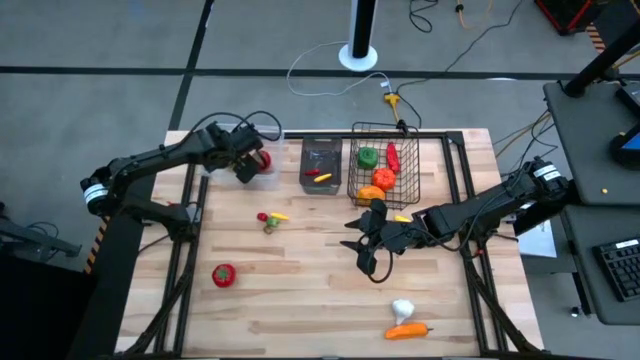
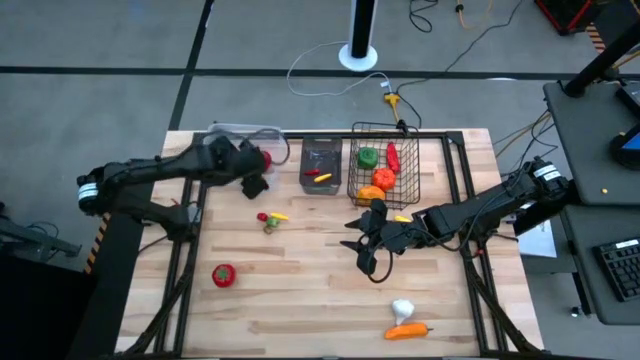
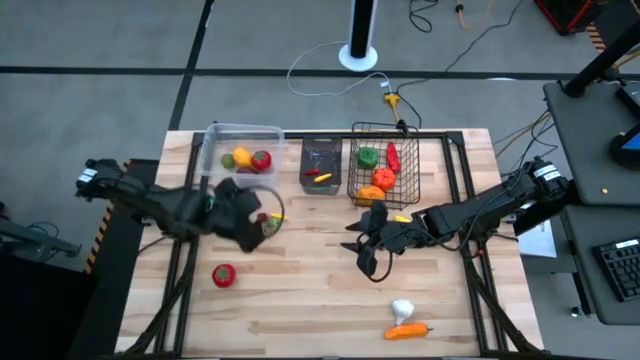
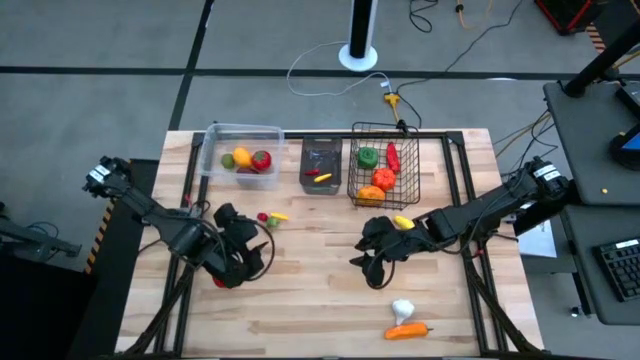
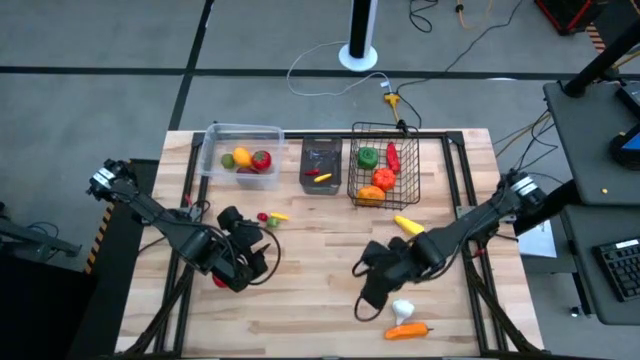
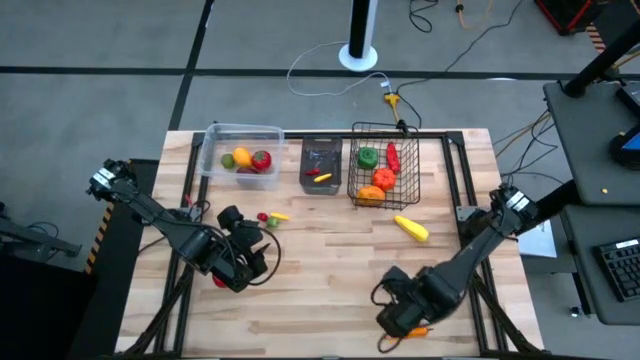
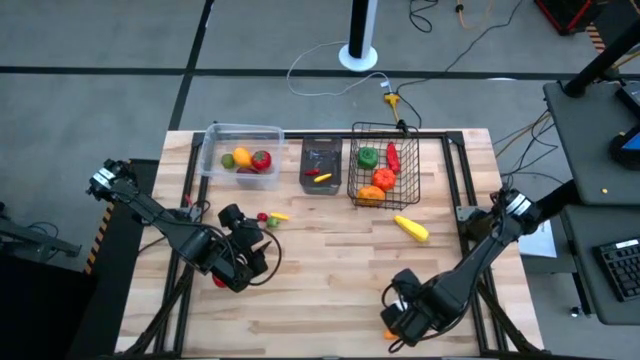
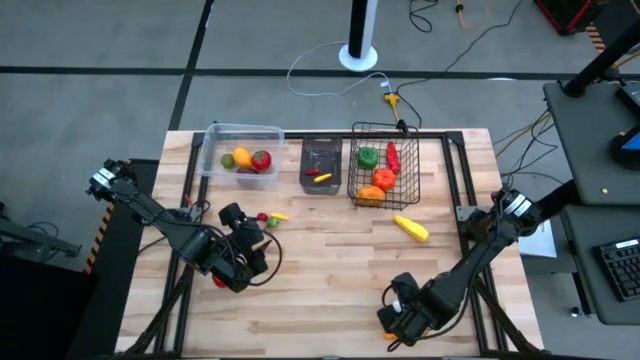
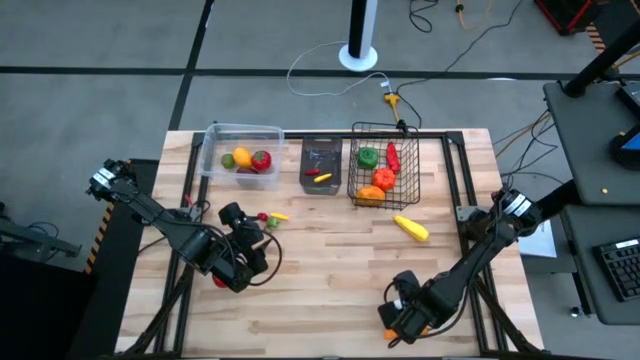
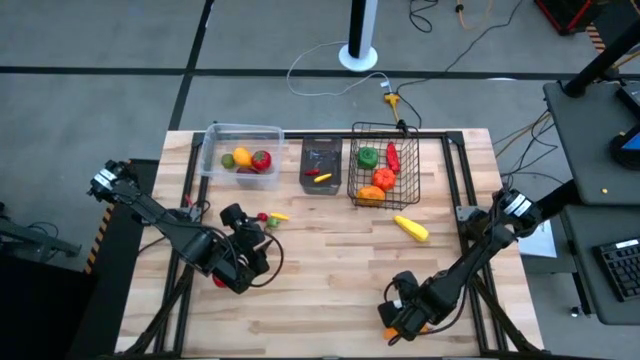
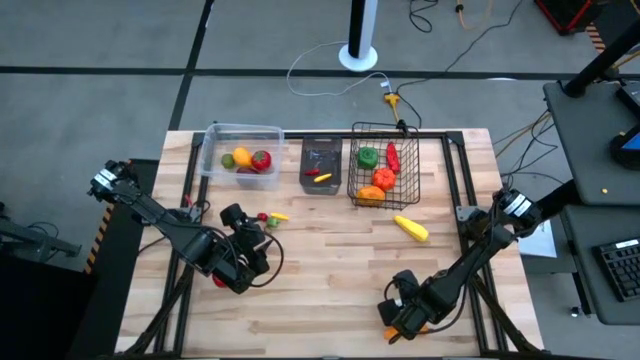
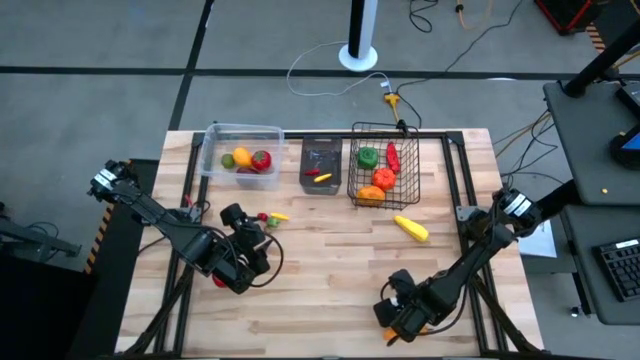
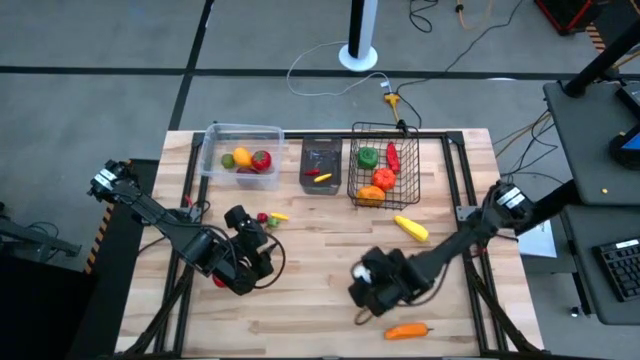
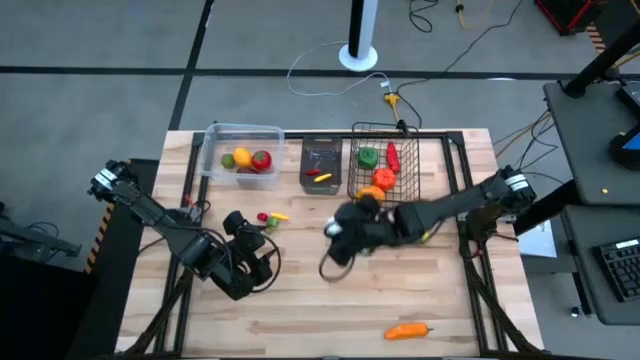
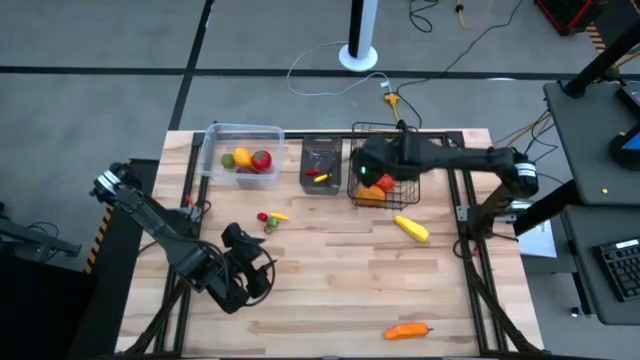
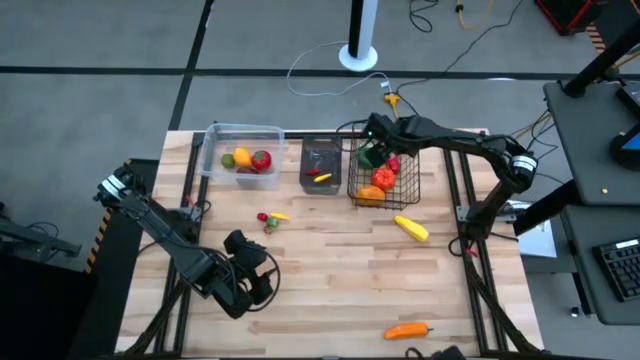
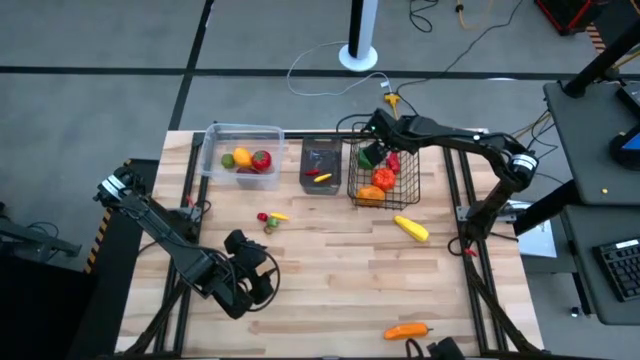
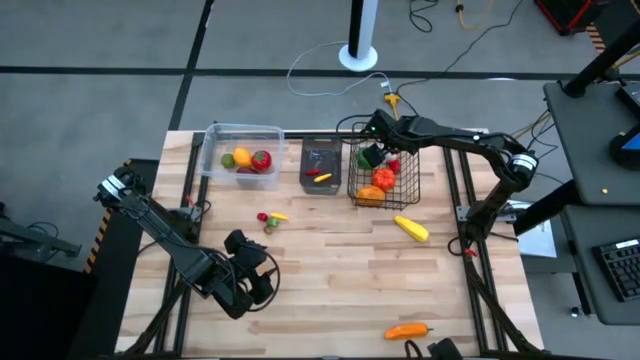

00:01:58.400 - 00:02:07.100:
Task: Sort produce into baskets
Put the white garlic into the wire basket

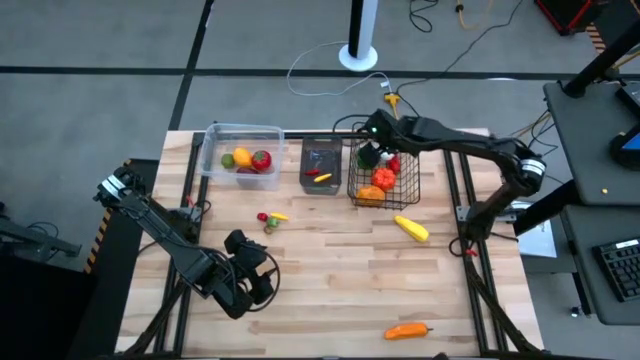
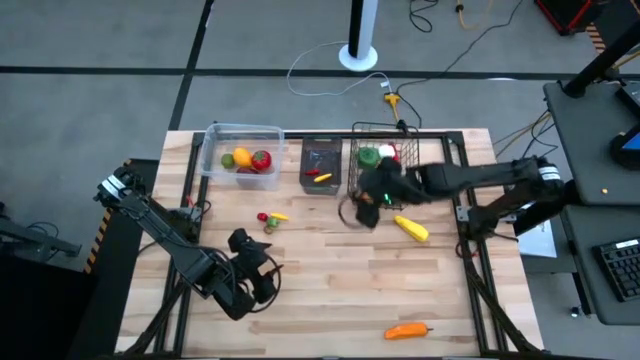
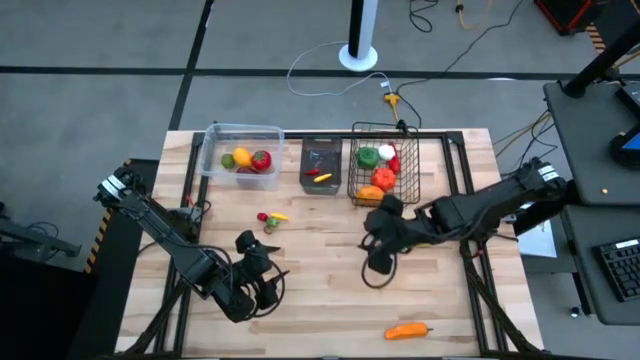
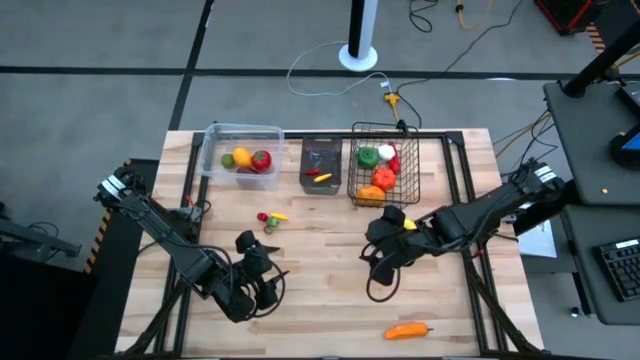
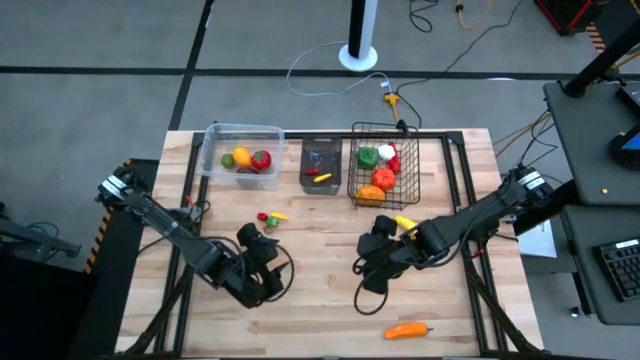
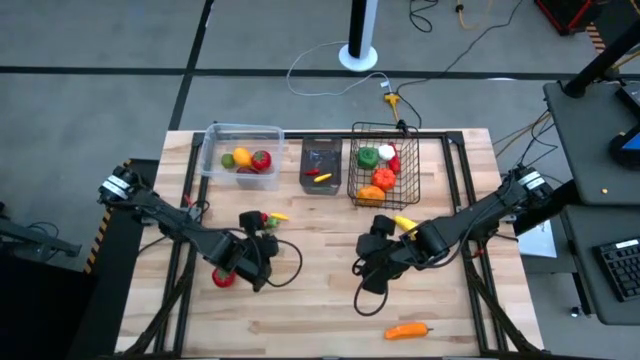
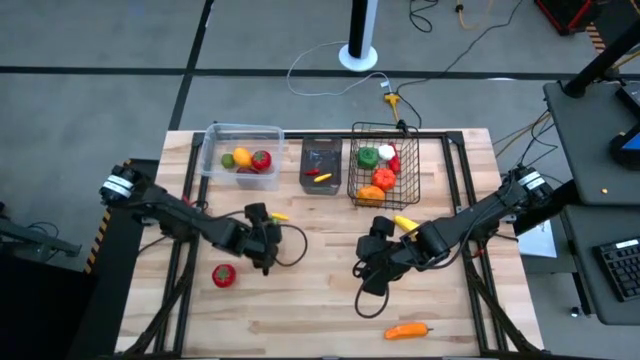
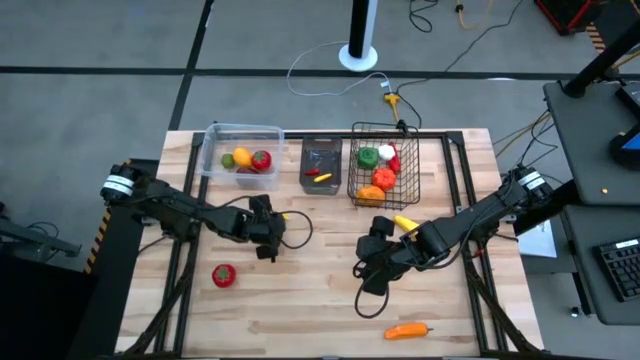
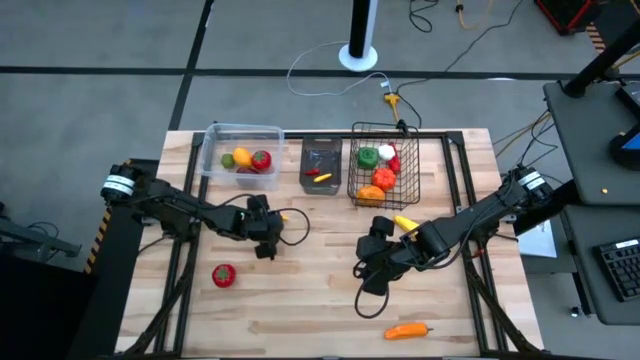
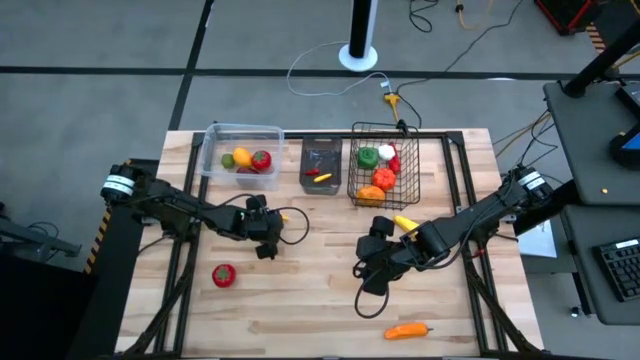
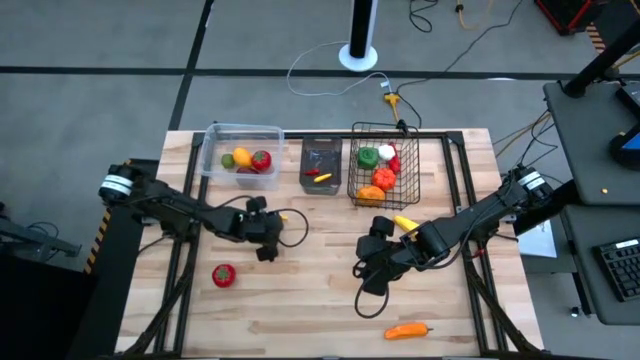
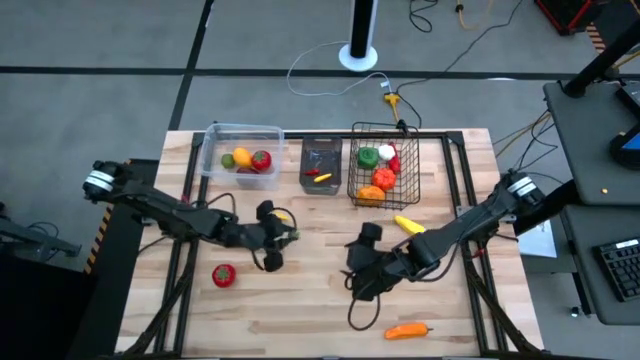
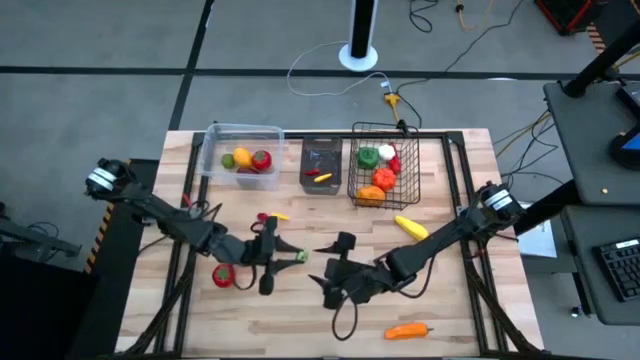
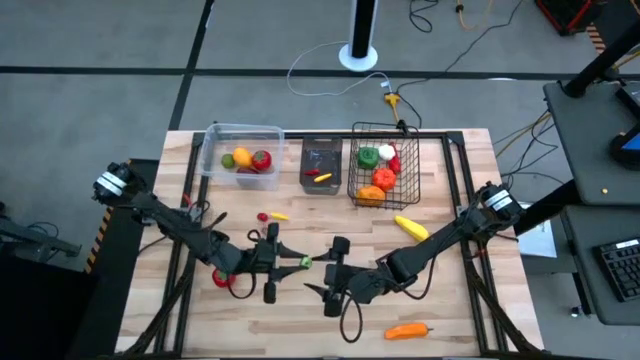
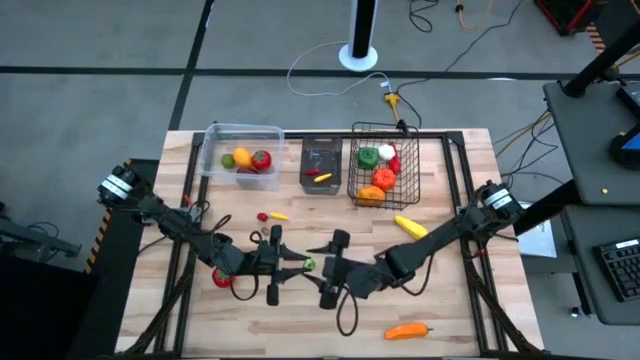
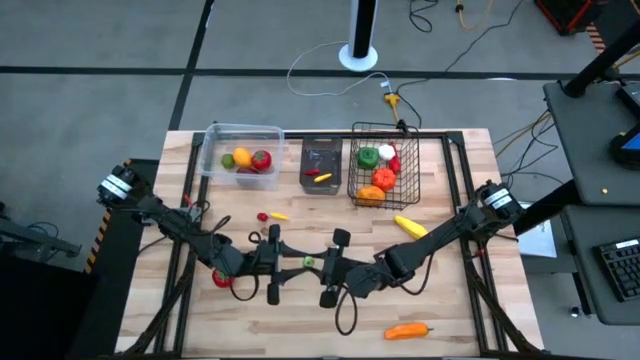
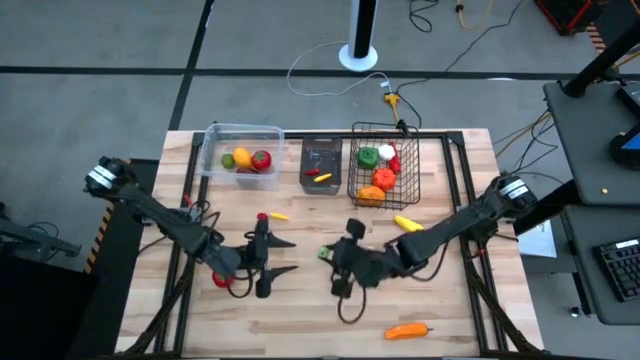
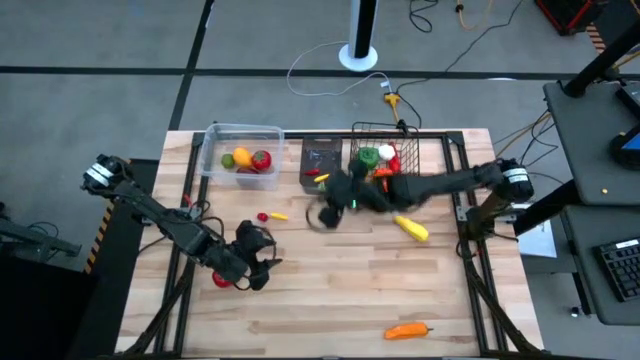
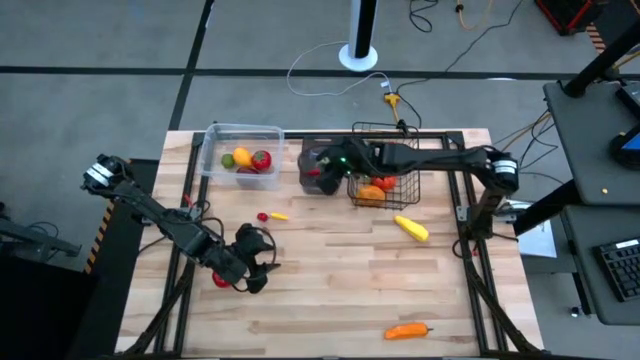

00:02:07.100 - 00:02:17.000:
Put the green chili pepper into the black bin

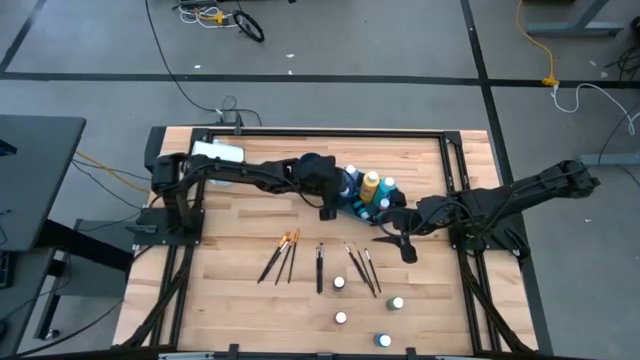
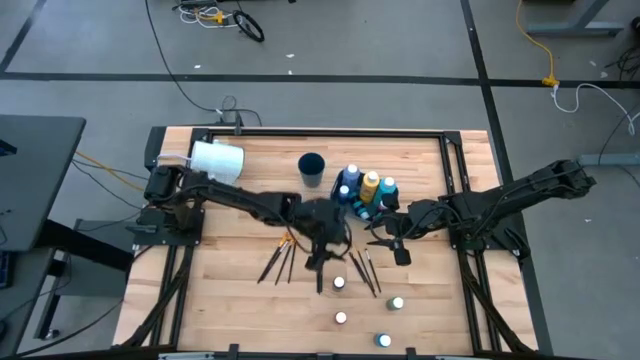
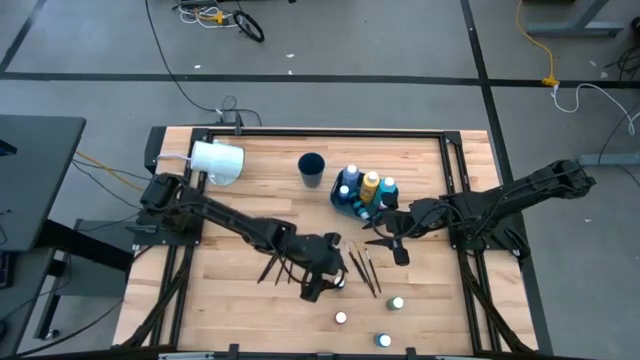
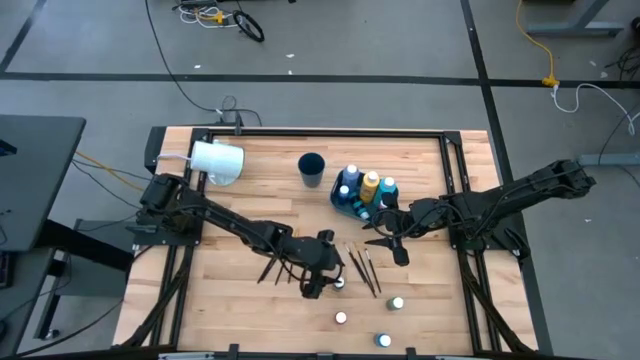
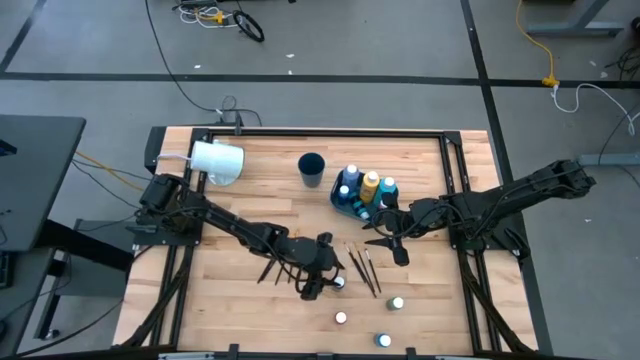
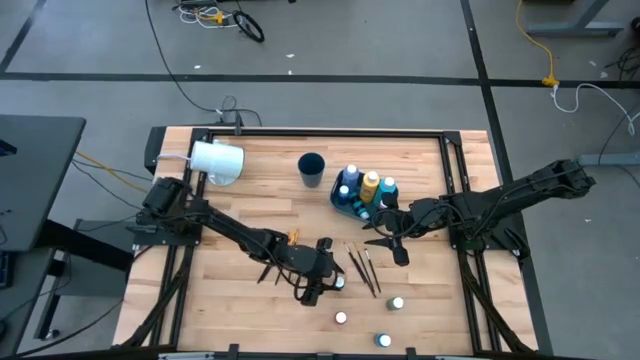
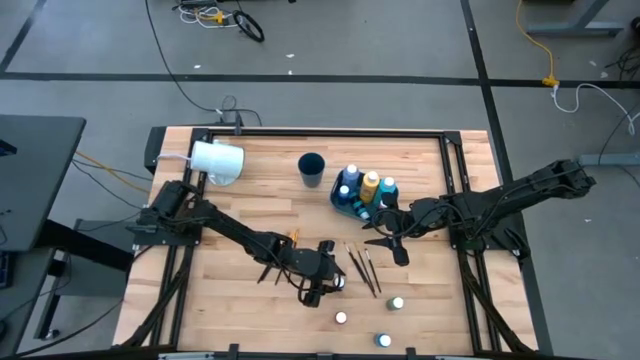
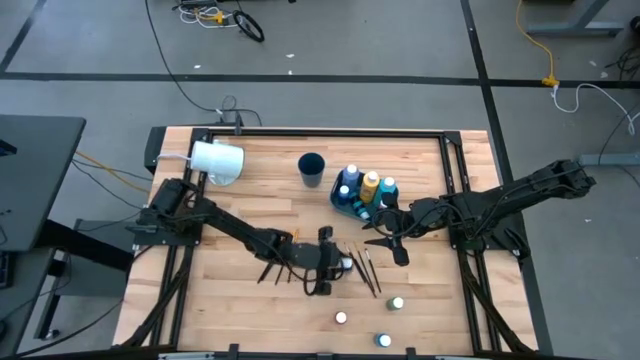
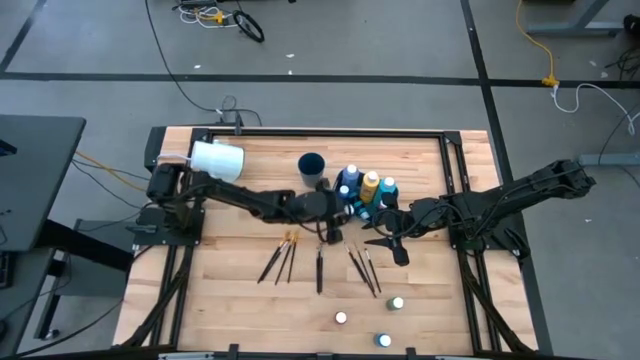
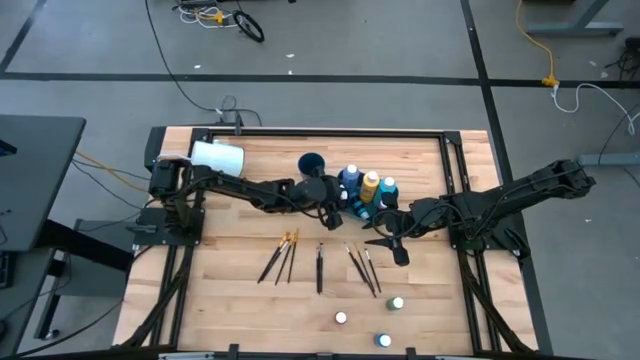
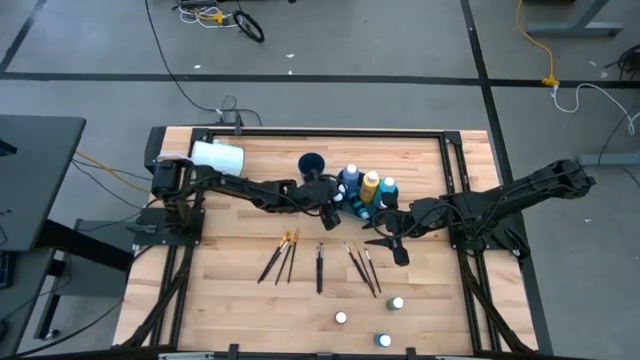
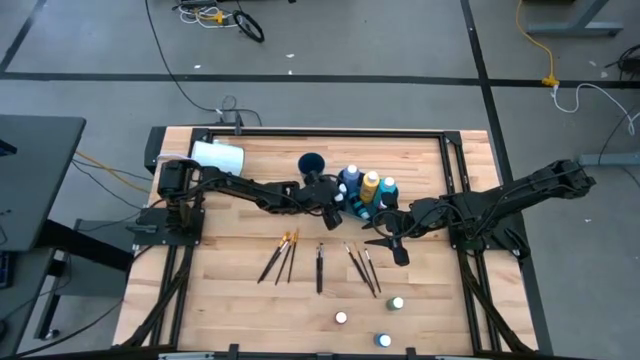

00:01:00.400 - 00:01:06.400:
Task: Pick & Place Paint Supplies
Put the small black paint bottle into the blue bin
